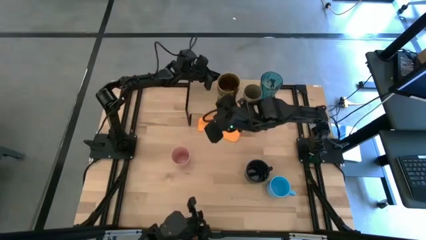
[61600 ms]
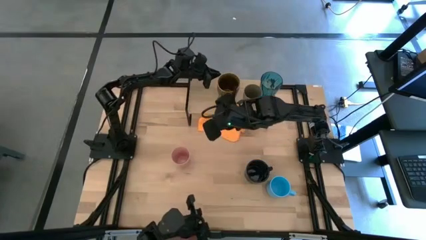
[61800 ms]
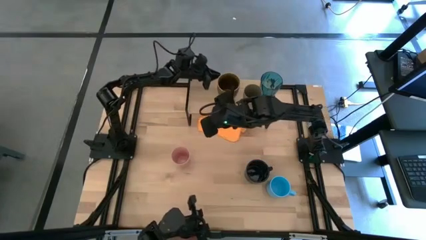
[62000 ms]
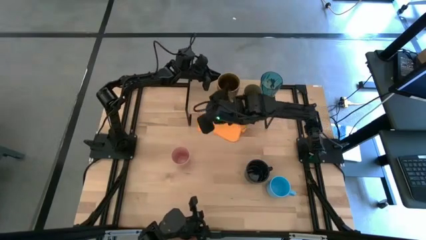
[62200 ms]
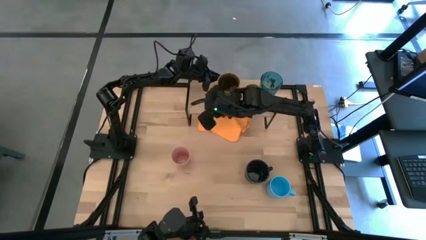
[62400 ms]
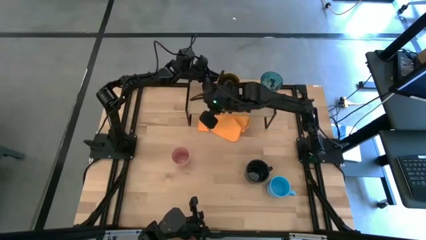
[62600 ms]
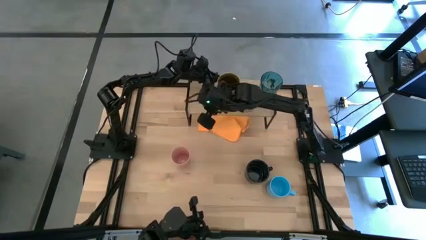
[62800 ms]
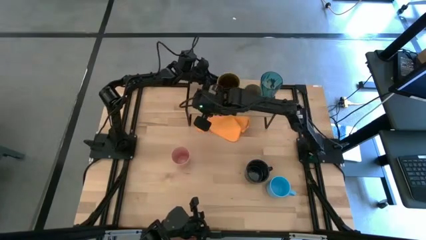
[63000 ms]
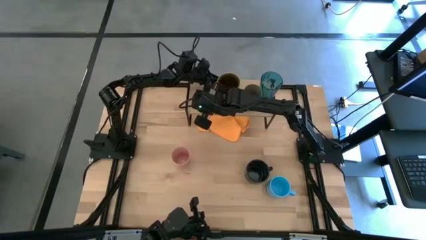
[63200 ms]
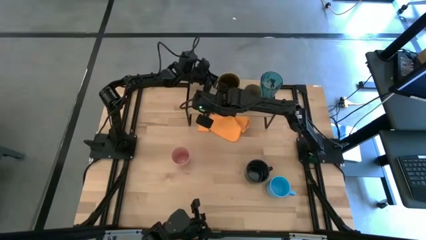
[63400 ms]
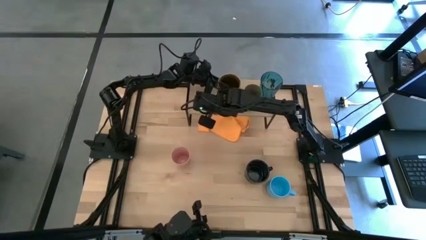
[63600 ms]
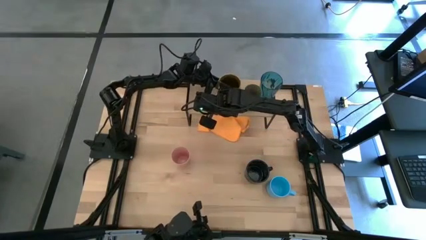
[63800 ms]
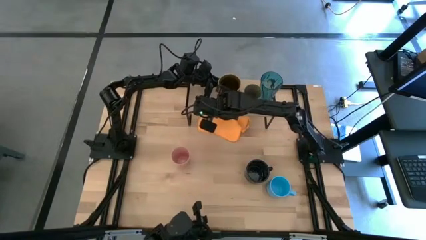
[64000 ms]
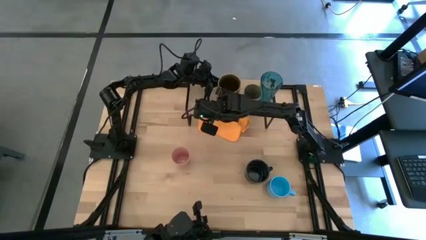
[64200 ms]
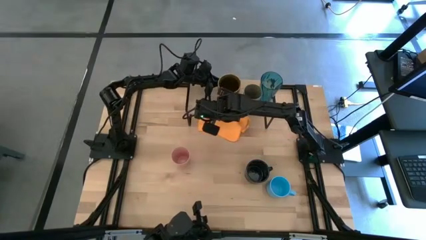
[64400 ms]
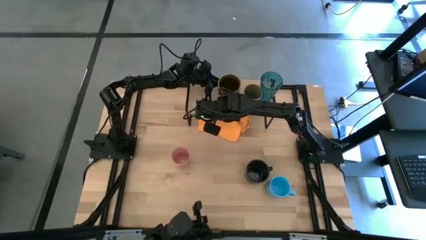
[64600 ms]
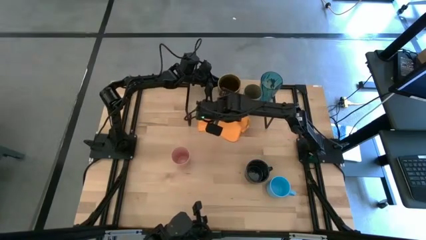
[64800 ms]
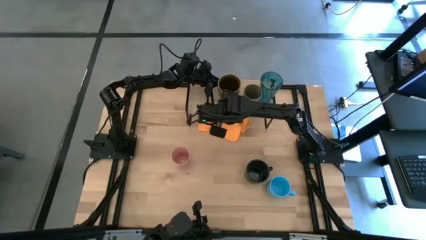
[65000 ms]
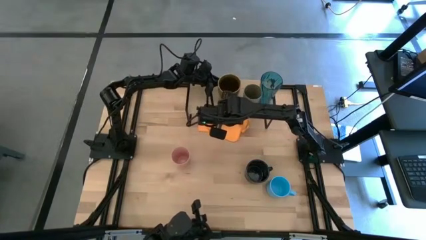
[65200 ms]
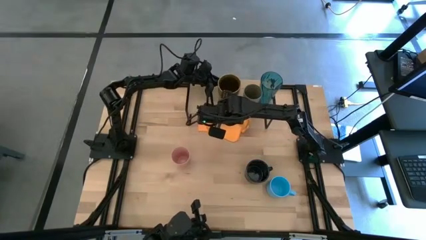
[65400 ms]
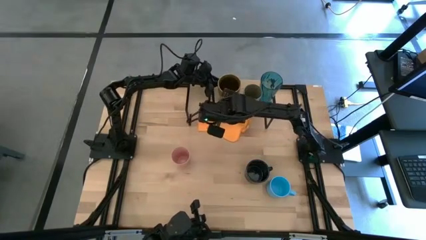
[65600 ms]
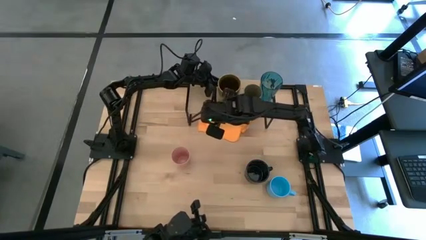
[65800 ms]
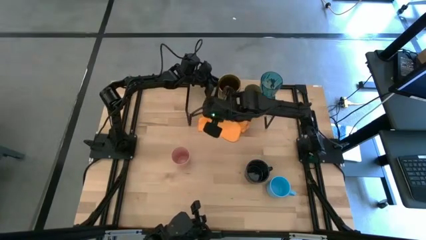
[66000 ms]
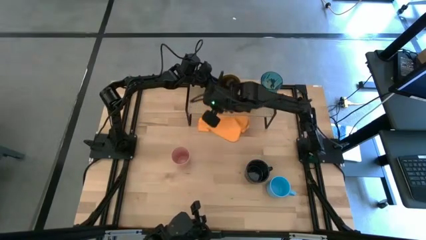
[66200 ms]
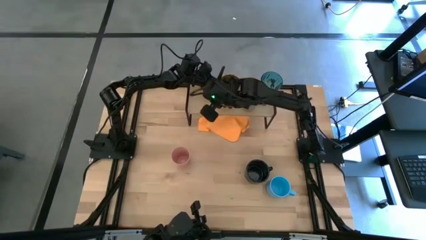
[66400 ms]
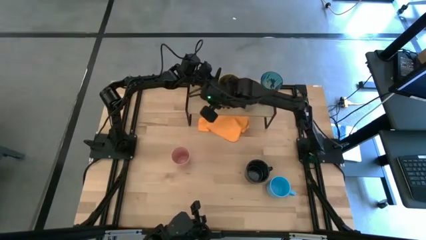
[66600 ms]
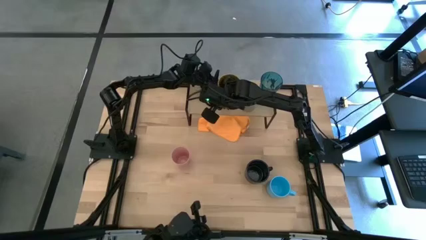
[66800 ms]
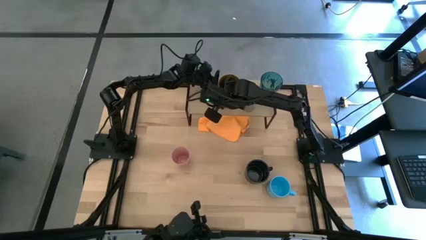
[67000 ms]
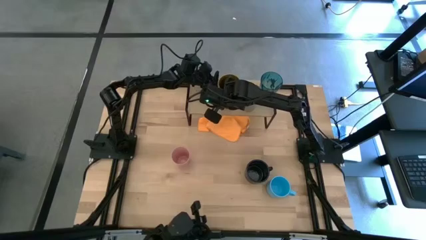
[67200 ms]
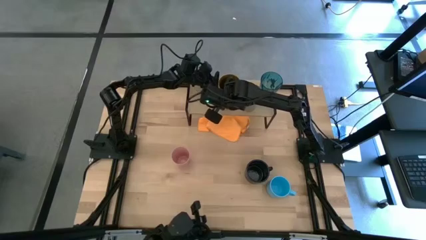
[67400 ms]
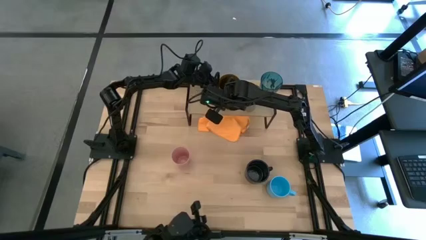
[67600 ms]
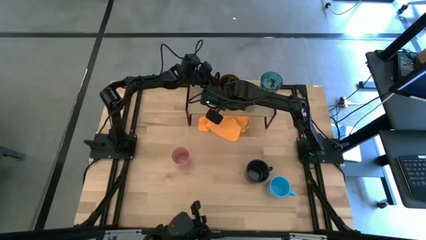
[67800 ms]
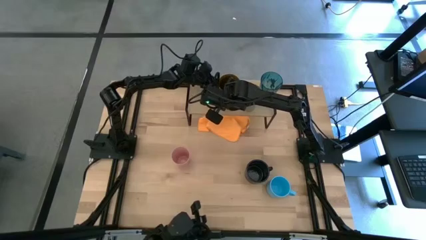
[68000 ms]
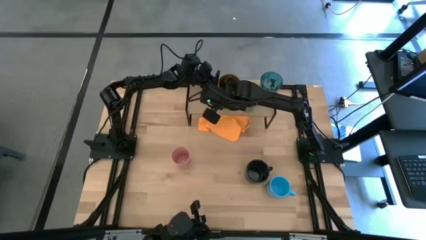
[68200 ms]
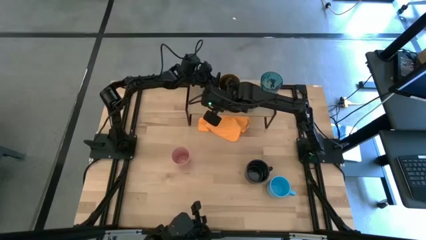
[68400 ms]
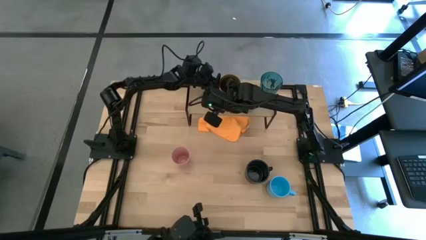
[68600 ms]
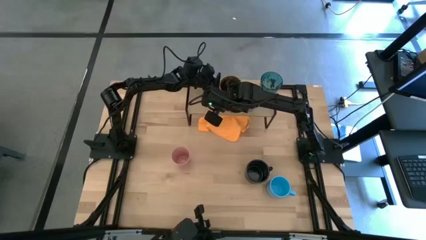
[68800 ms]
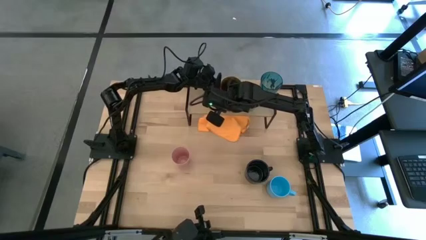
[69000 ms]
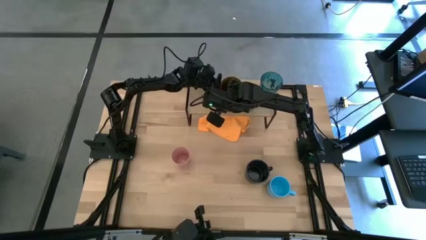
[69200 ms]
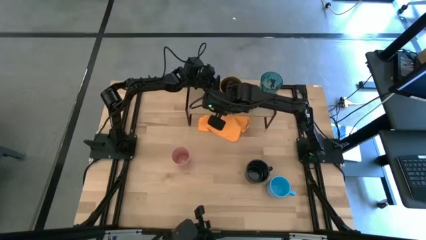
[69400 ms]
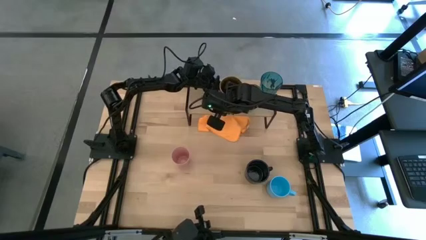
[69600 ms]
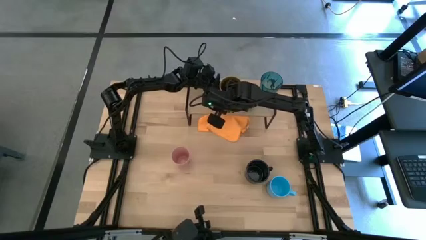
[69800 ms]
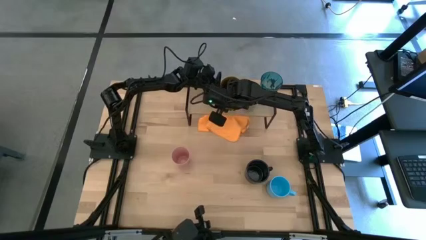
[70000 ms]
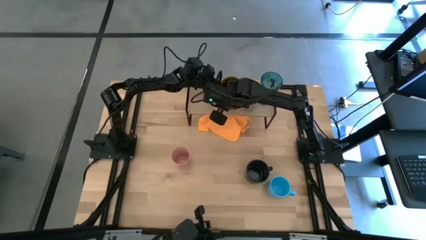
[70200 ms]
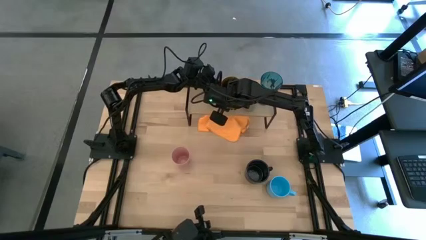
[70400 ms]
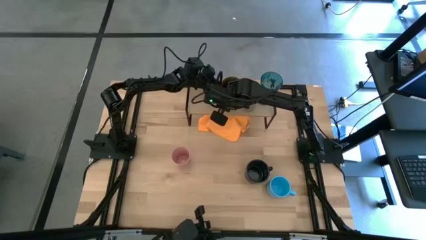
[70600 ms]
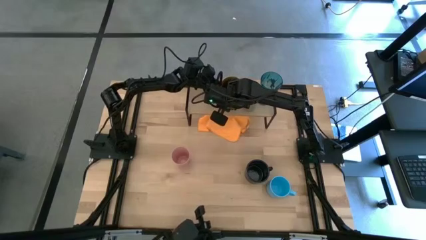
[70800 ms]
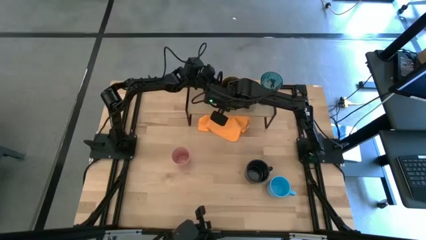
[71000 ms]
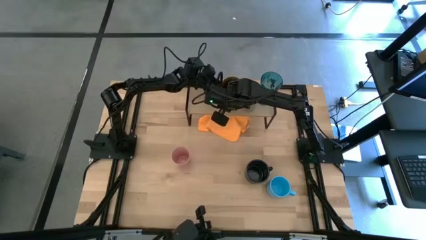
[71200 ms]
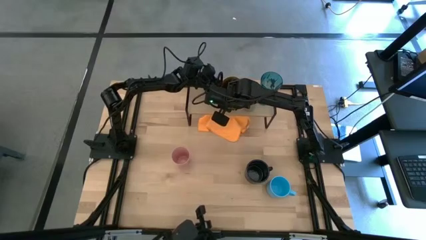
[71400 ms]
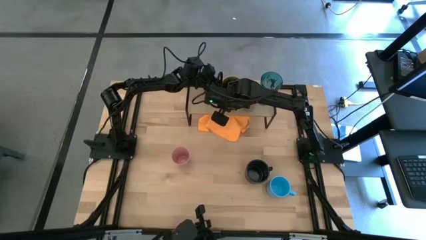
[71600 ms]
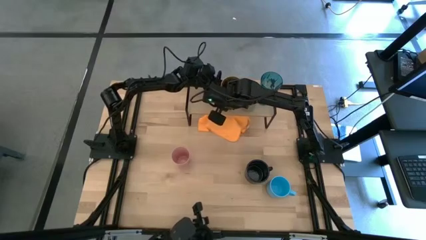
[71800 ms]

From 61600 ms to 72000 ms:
Task: Stack small to large cups/mugs on shelf
Put the brown mug on the shelf

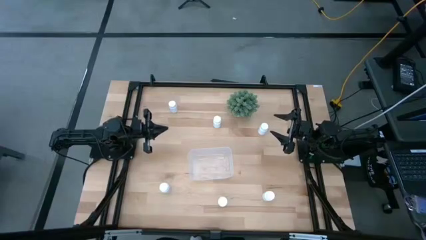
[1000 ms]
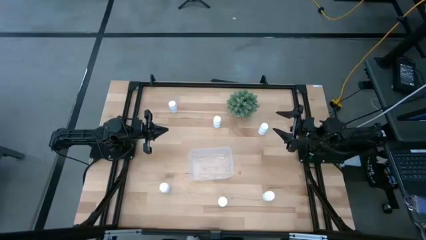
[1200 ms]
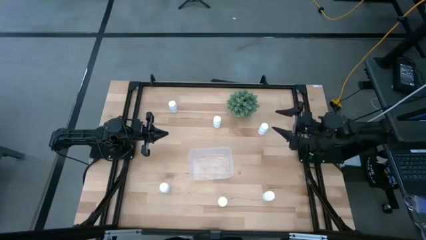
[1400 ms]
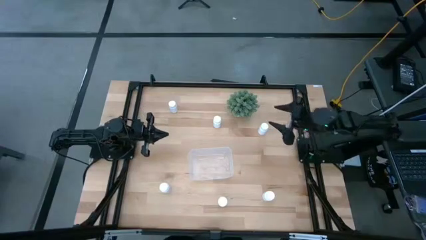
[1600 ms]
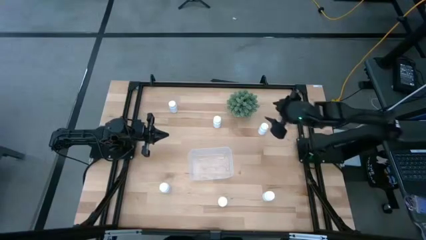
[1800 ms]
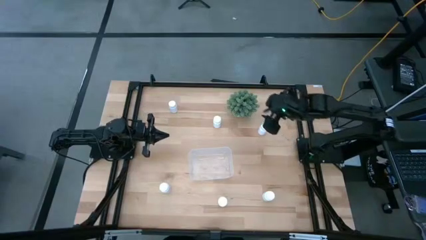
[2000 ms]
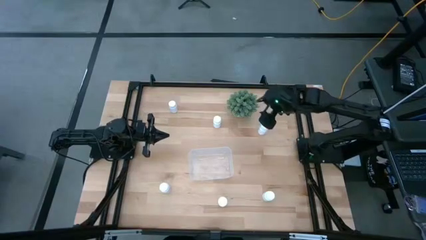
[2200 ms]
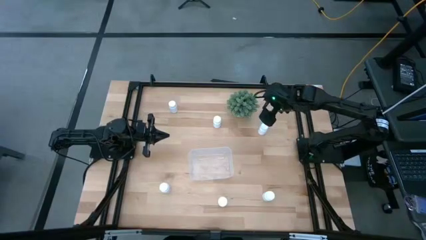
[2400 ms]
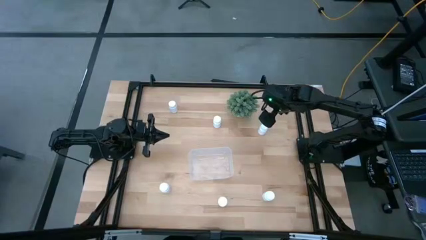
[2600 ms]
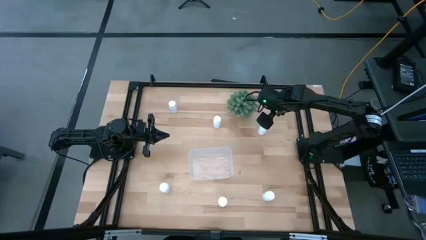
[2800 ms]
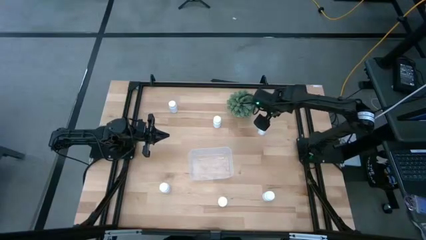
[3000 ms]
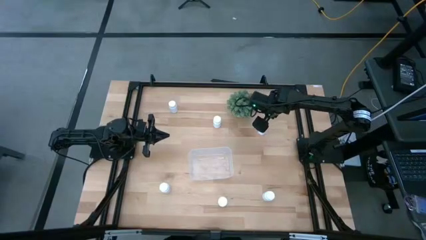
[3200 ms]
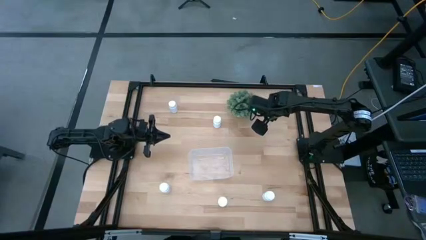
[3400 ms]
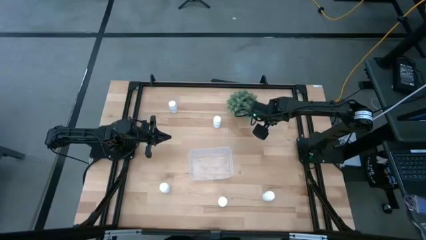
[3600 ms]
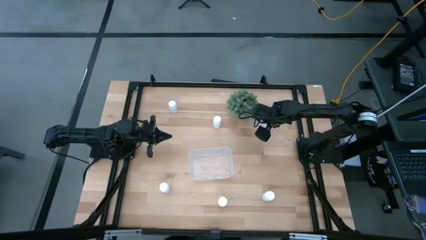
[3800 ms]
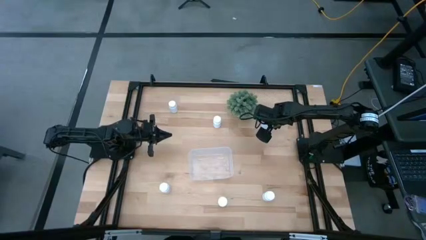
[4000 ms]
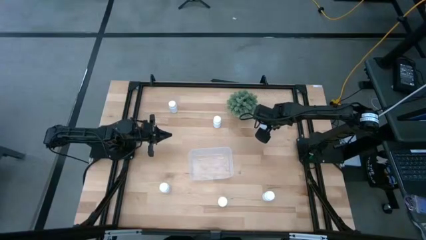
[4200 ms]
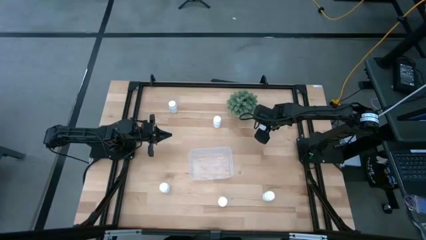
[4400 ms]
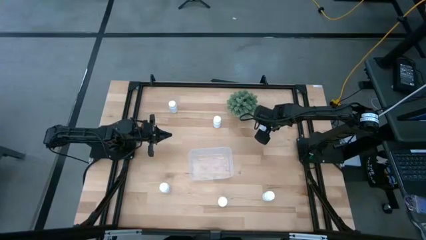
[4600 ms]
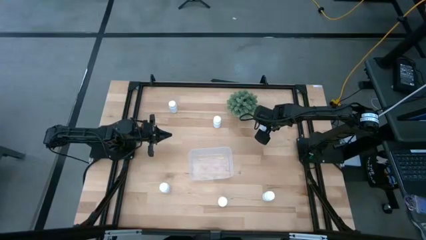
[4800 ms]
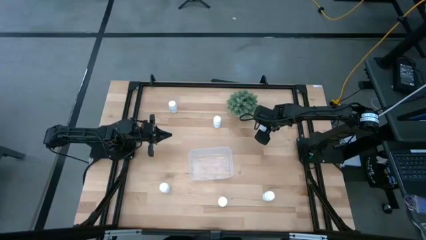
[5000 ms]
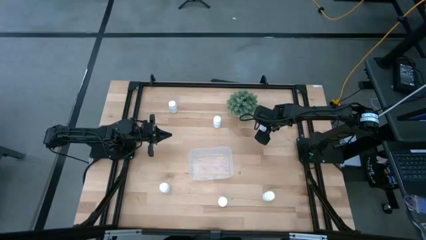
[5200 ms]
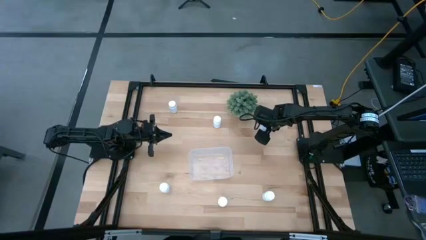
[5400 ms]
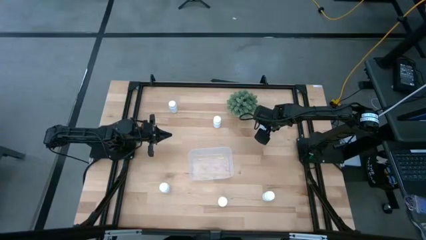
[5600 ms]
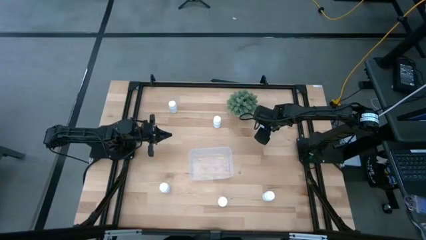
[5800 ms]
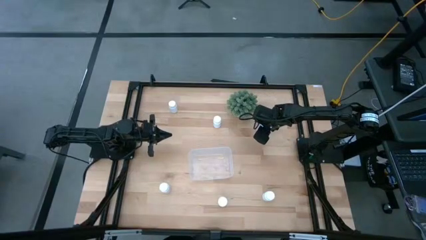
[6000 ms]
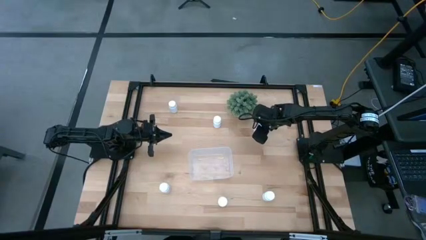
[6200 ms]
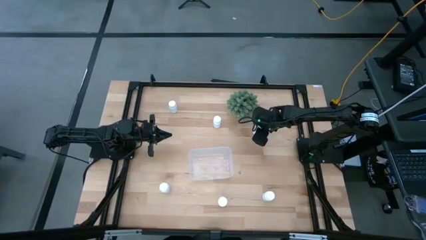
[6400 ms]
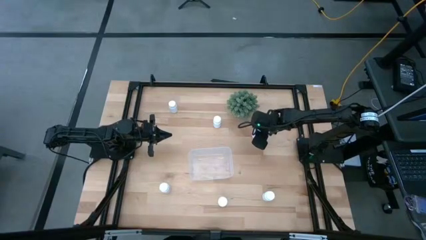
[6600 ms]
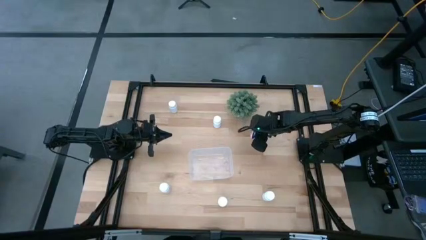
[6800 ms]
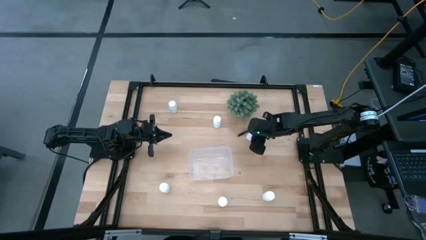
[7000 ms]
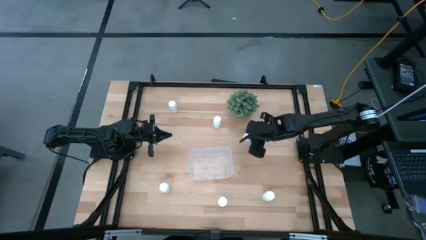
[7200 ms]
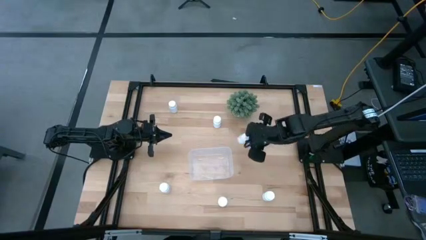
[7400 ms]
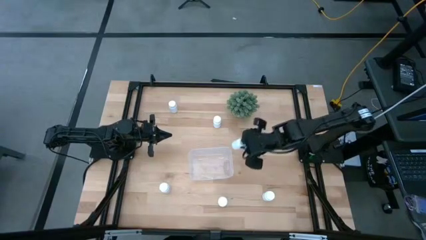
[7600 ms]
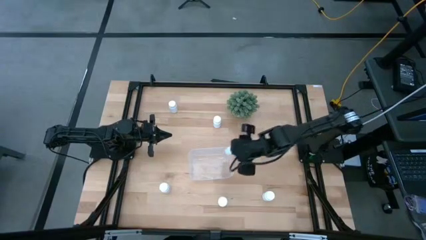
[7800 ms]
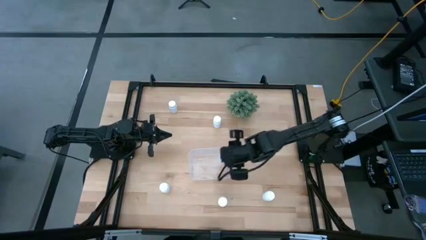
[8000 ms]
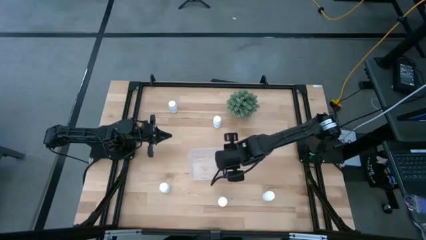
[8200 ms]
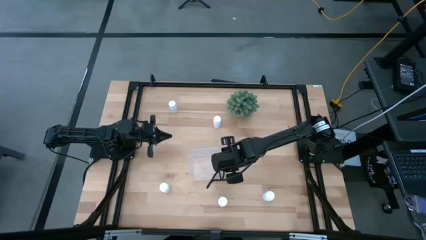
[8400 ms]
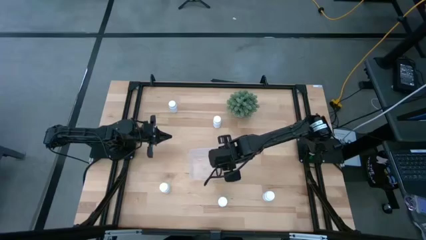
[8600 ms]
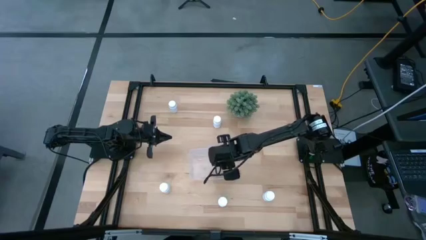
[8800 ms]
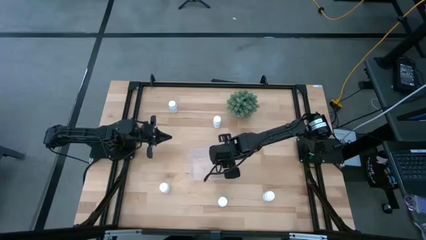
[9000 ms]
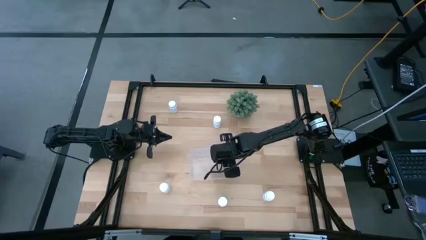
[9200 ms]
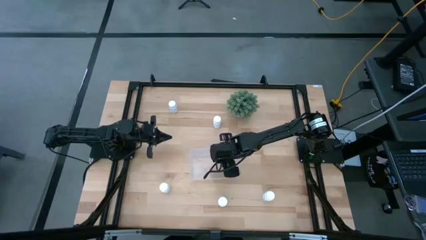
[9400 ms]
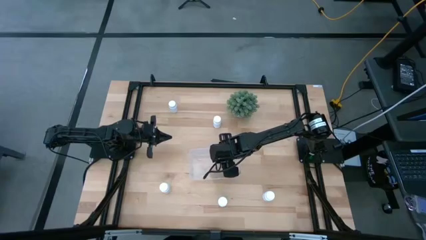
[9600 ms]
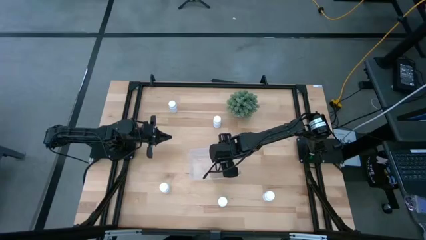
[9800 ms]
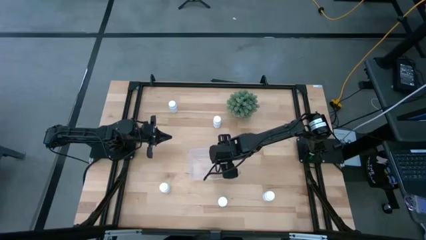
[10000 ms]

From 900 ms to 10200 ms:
Task: Pick and place pill bottles into a basket
Put the white medicine bottle into the transparent bin
